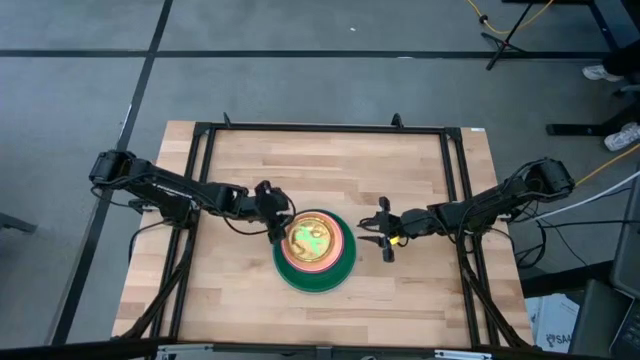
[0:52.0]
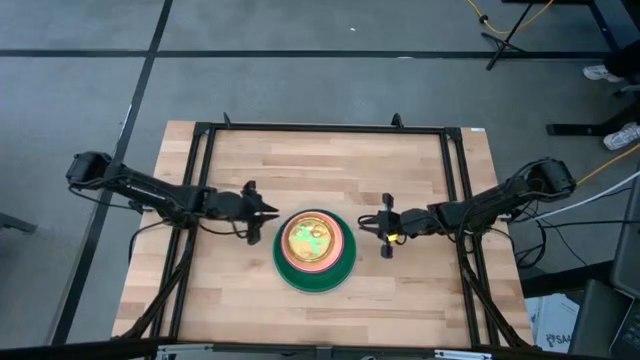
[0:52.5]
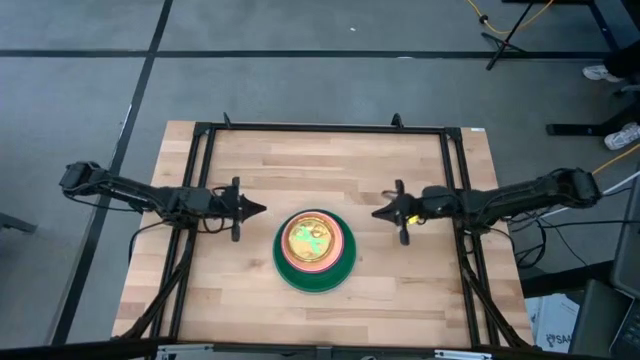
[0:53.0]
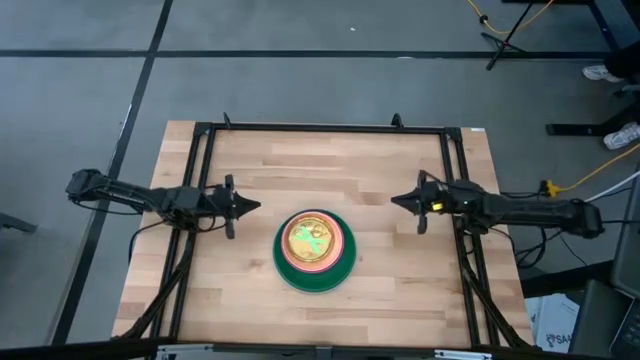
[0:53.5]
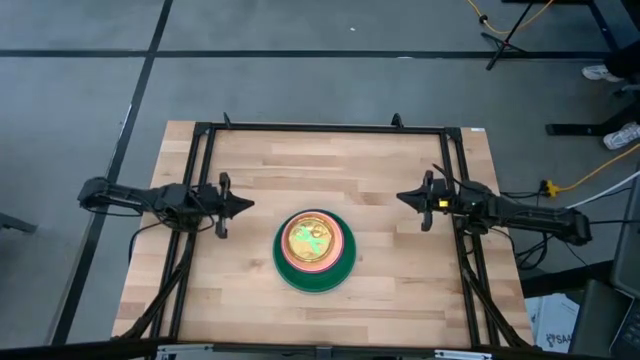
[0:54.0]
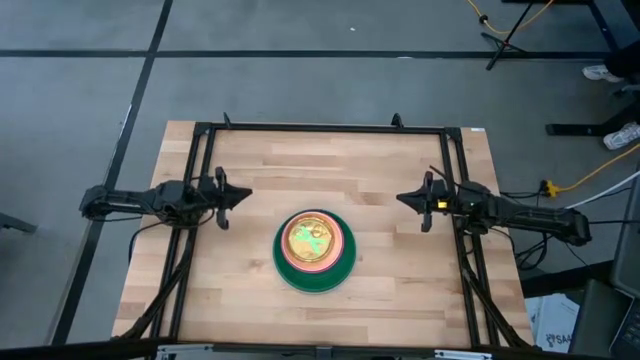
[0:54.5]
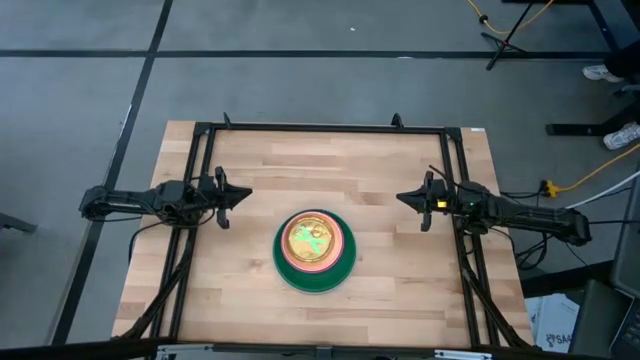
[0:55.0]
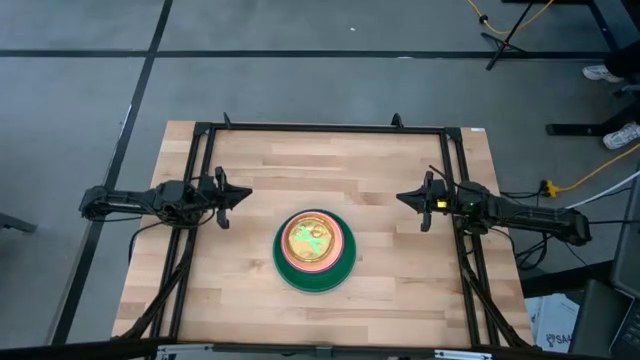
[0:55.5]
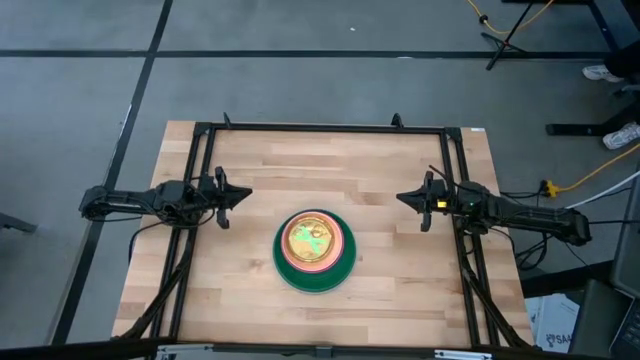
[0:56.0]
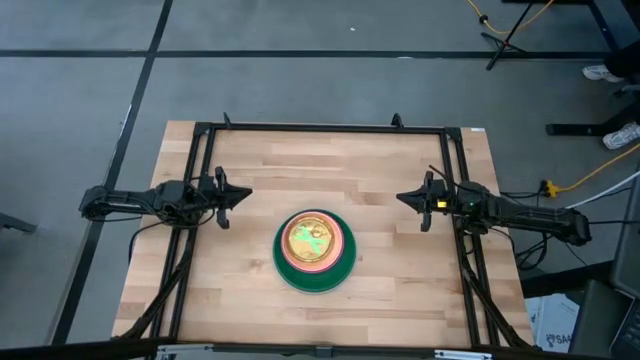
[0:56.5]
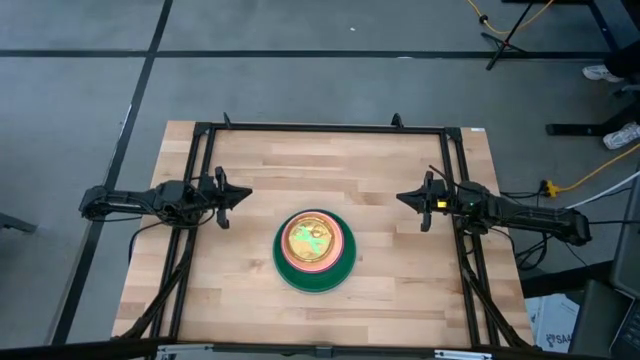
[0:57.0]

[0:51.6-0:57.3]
Task: Stack plastic plates
Return to Home Position

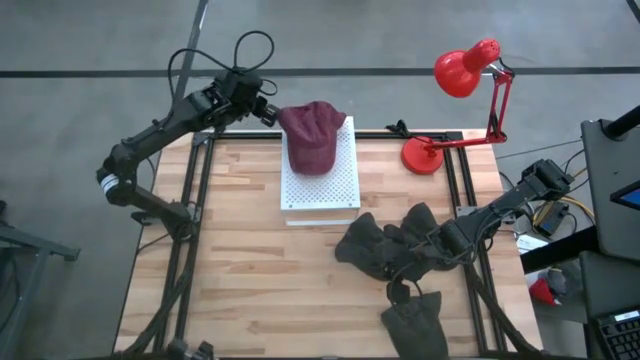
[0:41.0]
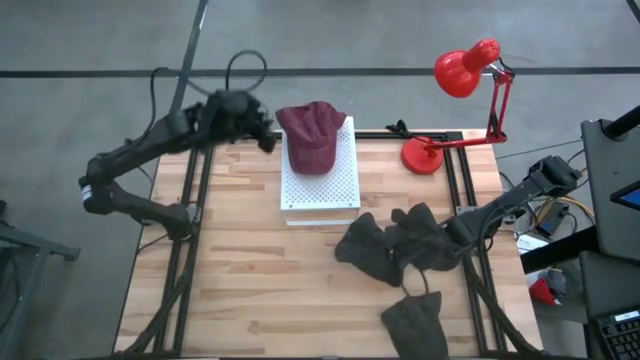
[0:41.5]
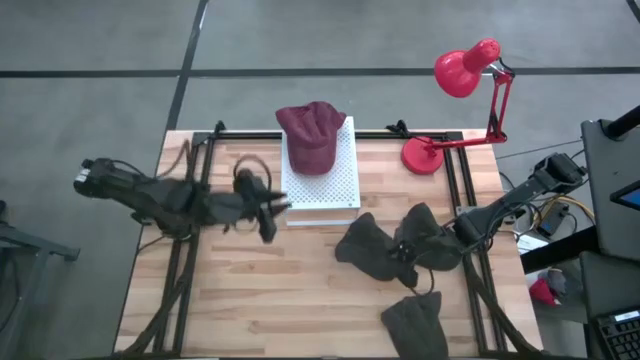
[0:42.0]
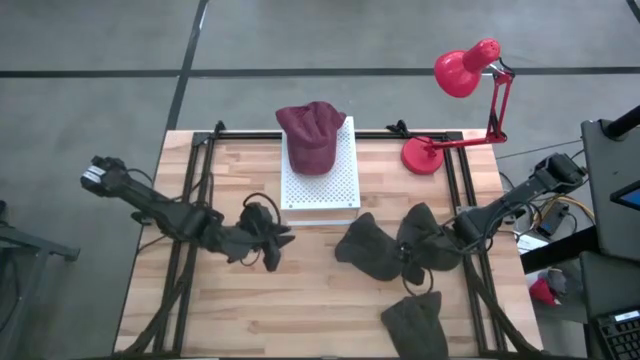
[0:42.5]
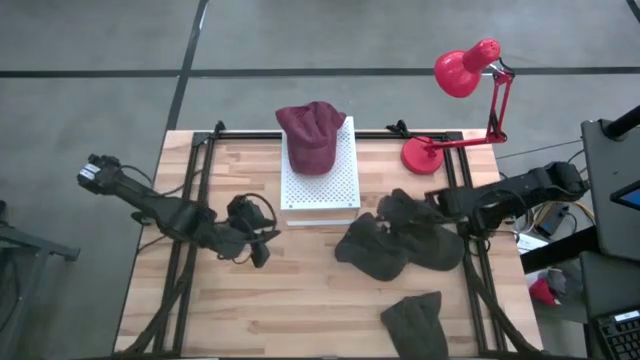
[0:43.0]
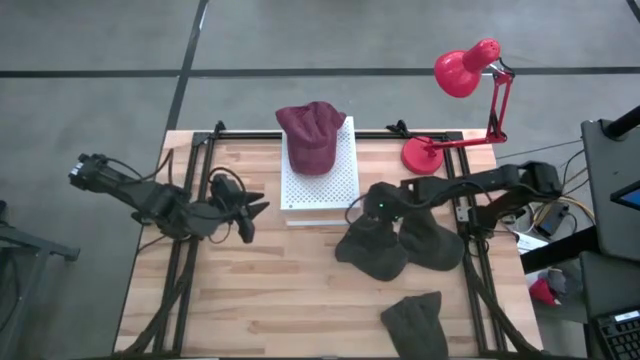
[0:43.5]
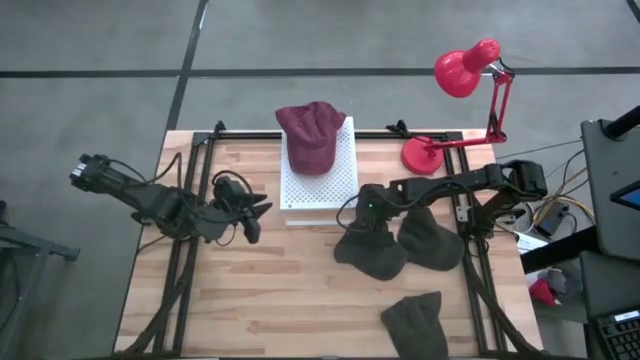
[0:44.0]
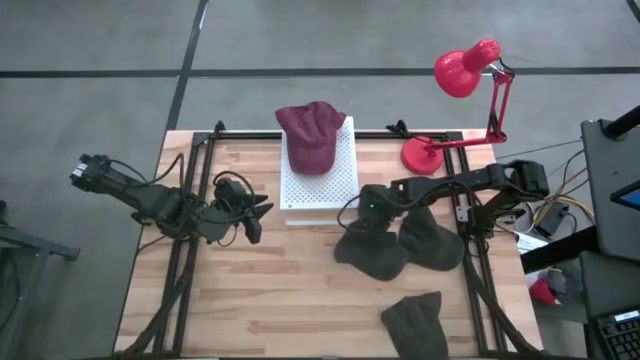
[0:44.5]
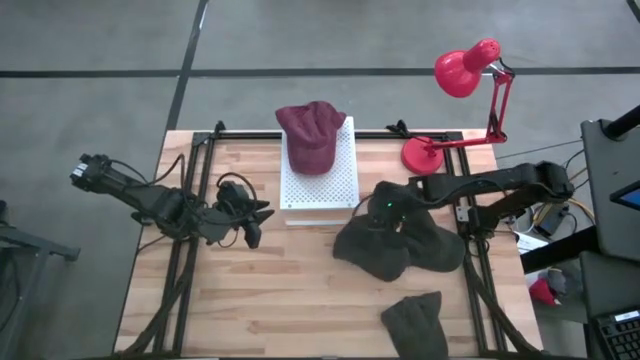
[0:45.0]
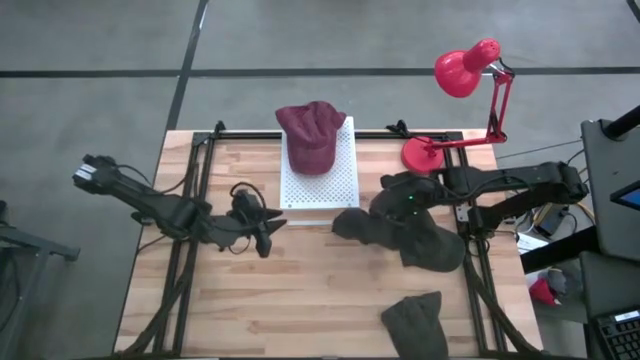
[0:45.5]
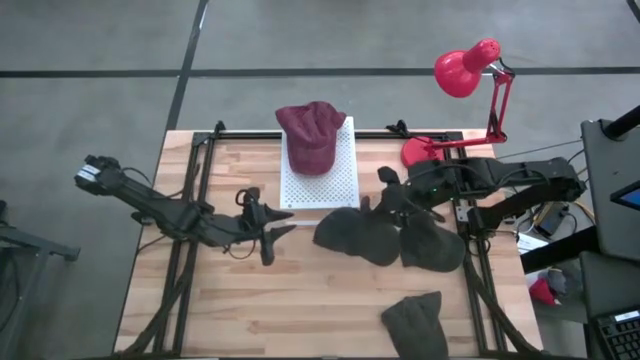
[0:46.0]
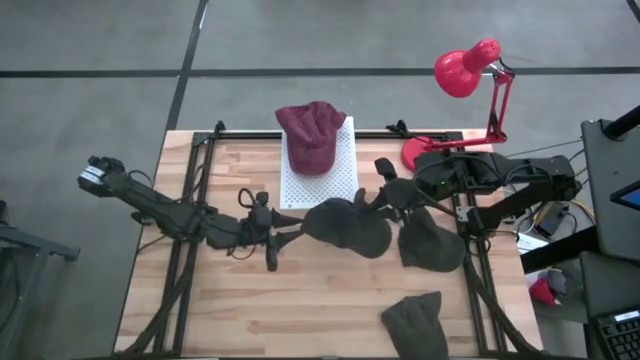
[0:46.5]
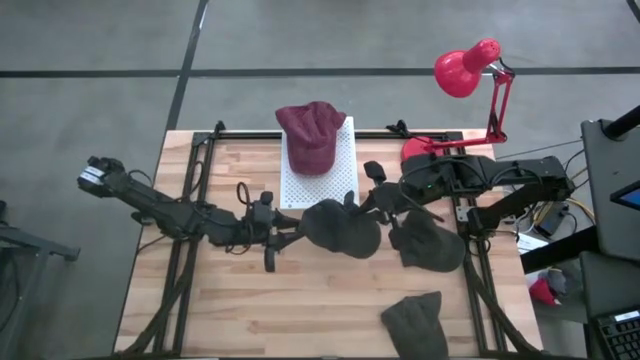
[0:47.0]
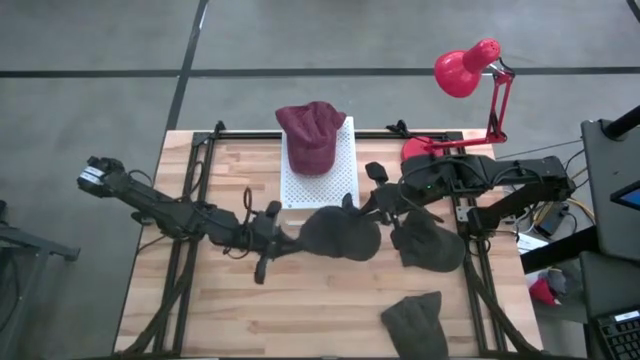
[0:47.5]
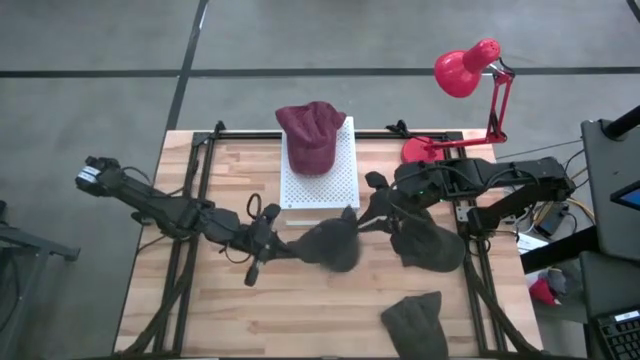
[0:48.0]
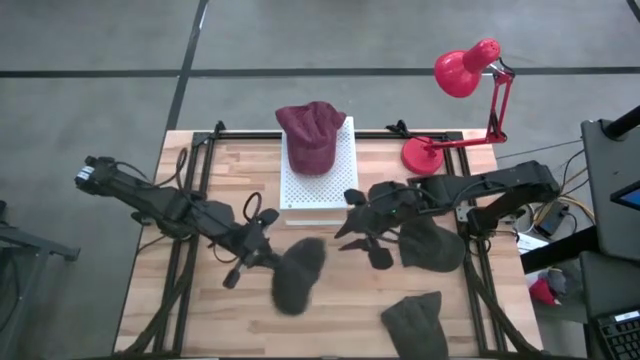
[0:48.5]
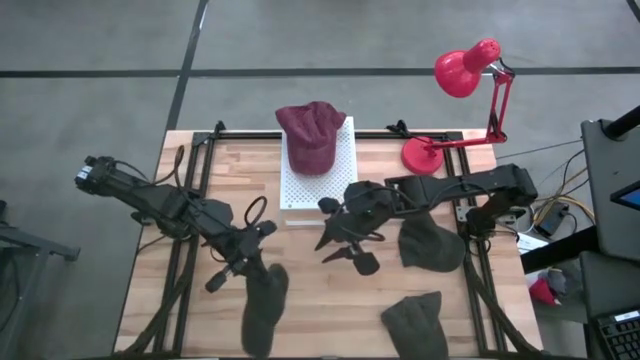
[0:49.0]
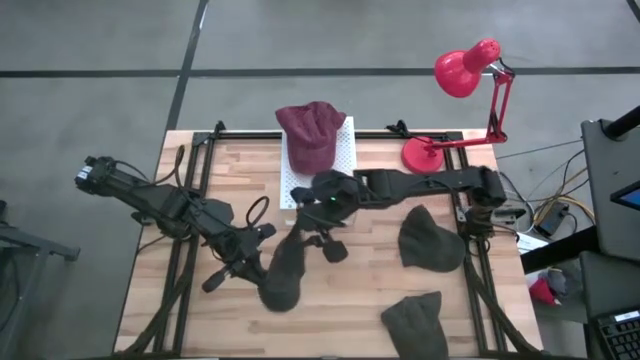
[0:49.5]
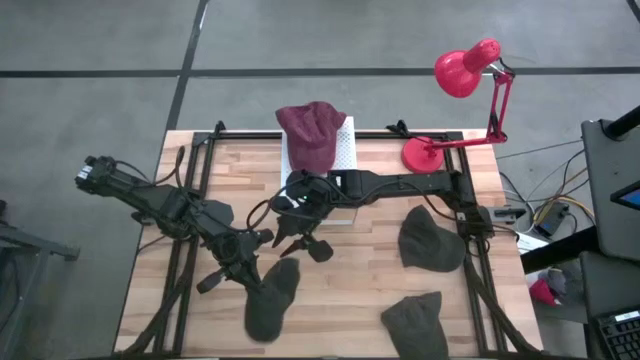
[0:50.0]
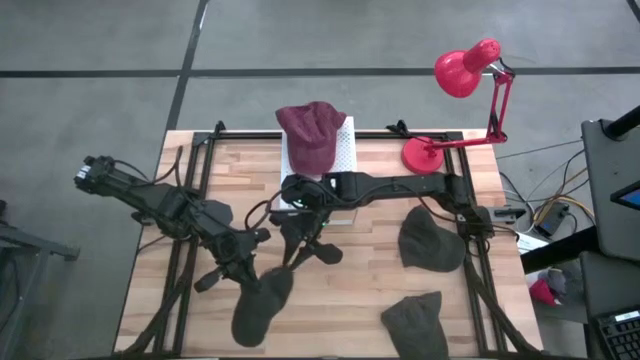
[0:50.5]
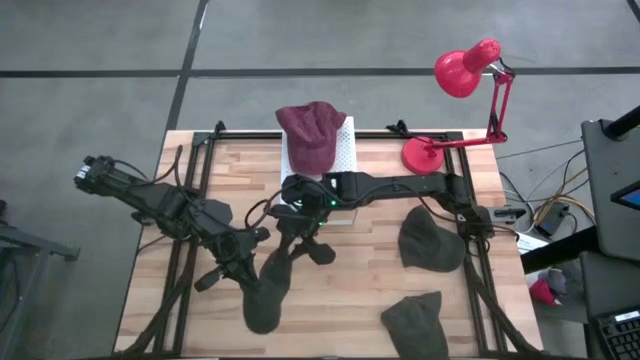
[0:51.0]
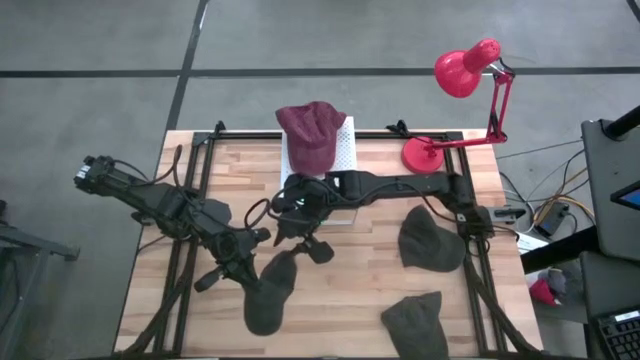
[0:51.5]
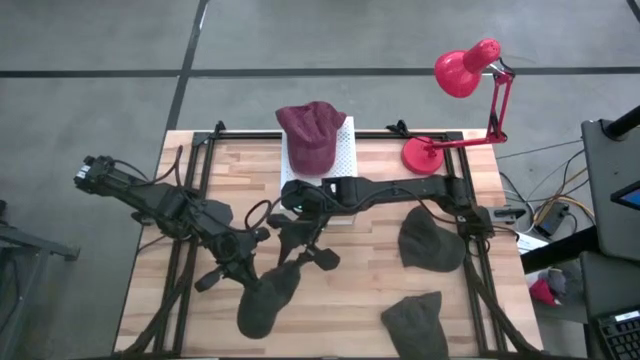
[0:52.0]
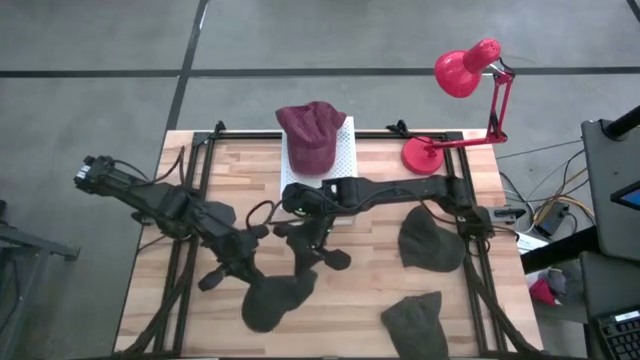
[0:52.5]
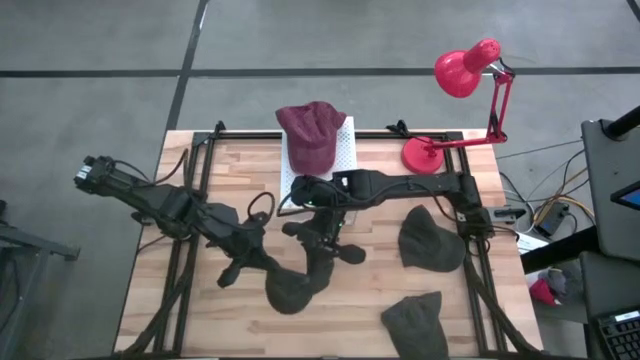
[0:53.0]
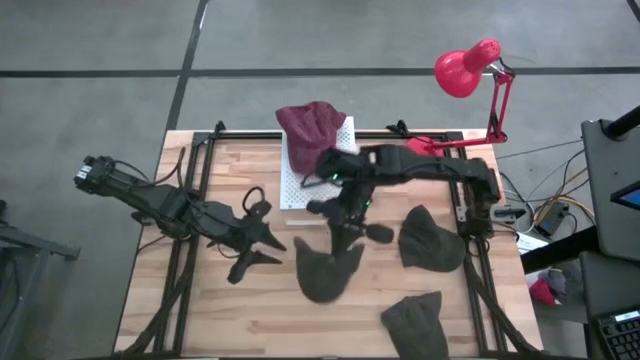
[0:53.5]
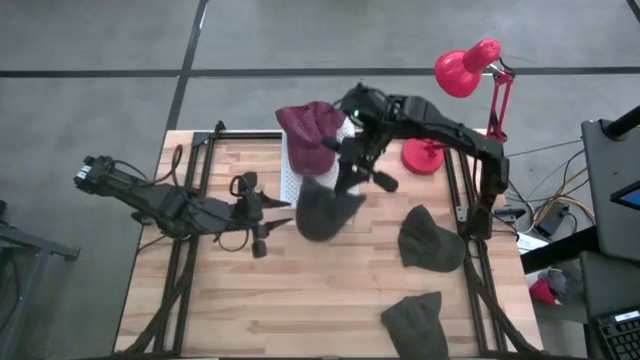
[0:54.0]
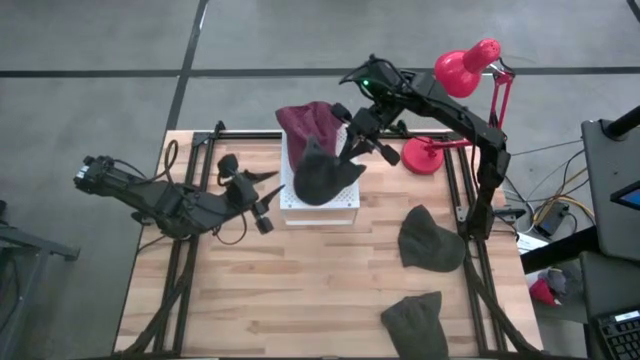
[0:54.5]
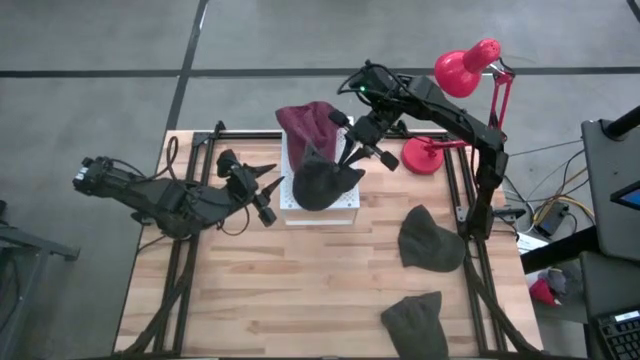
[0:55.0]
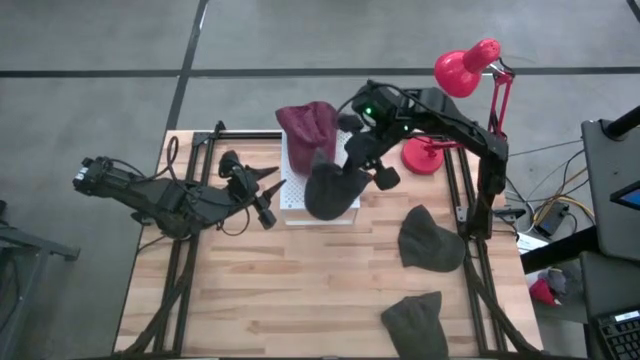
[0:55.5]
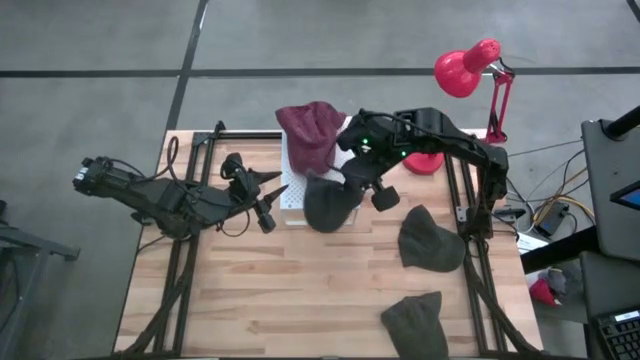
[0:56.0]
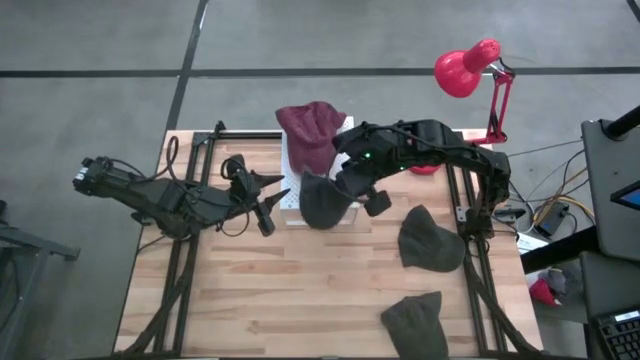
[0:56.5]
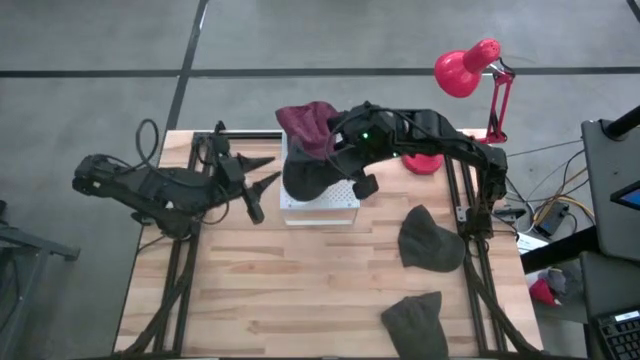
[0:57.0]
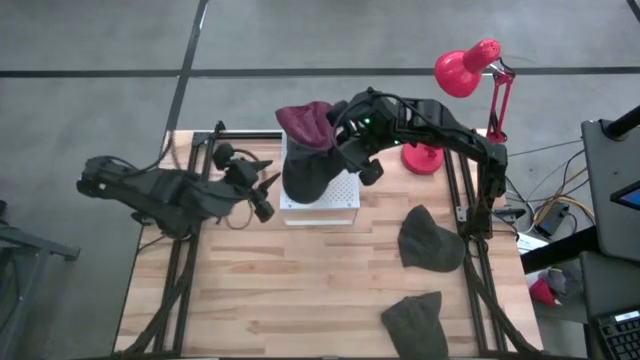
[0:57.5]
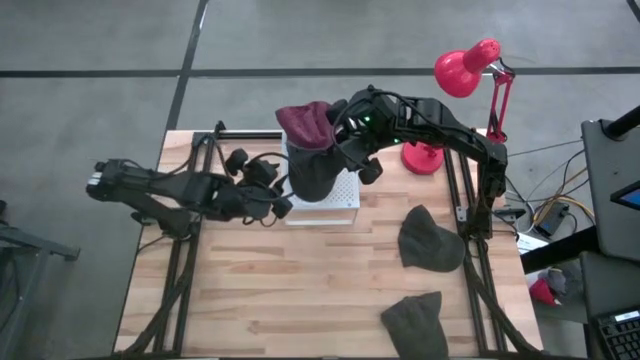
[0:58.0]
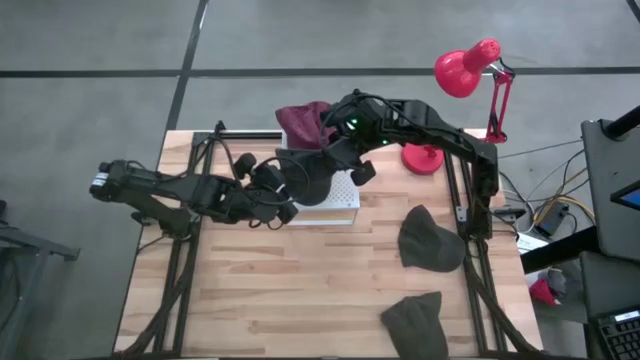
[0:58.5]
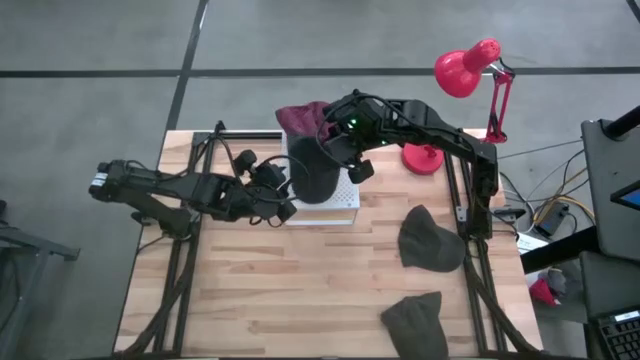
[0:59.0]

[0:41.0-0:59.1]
Task: Pick & Place hat
Put the top left black cap on the shelf
